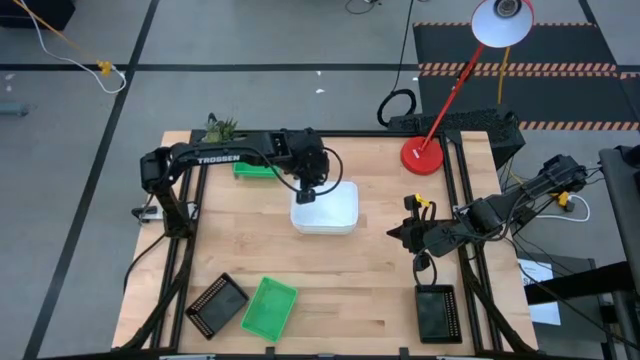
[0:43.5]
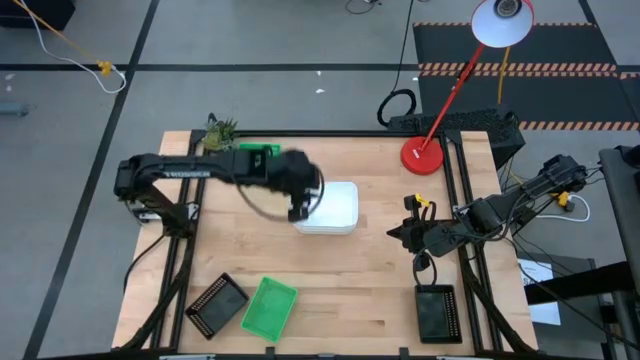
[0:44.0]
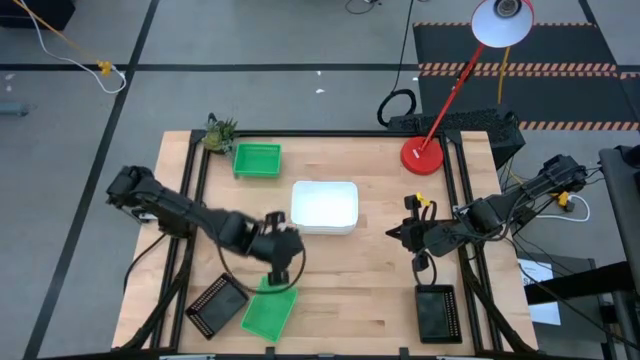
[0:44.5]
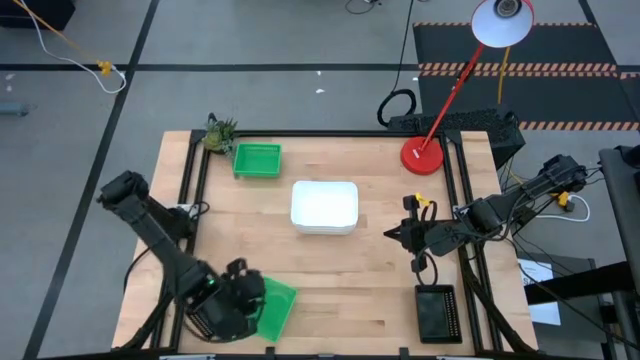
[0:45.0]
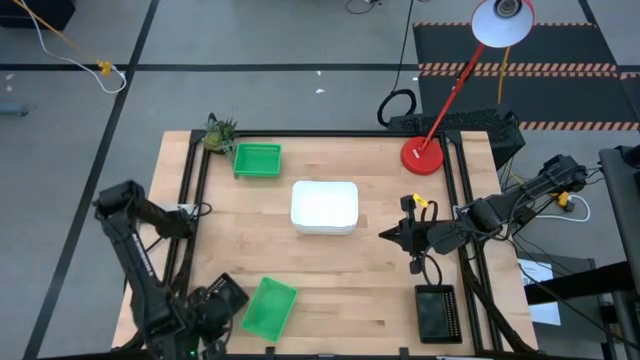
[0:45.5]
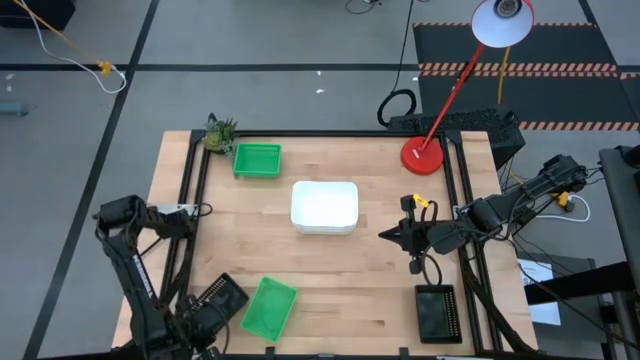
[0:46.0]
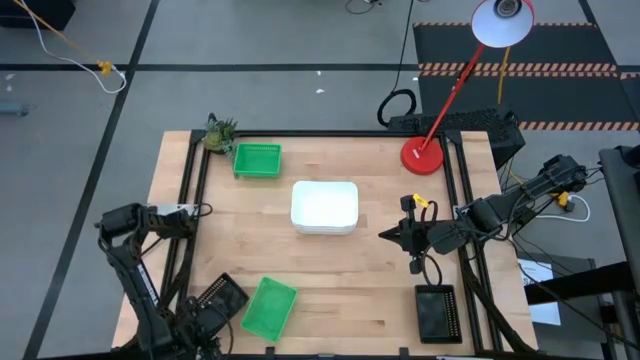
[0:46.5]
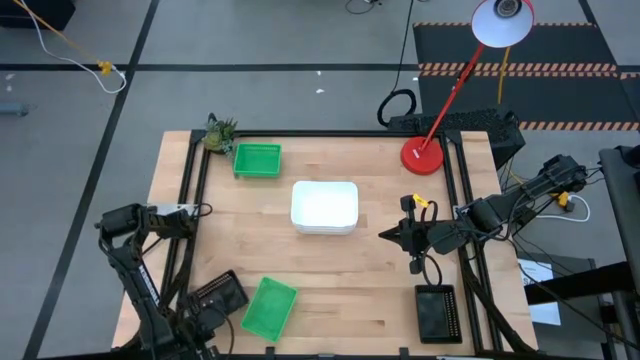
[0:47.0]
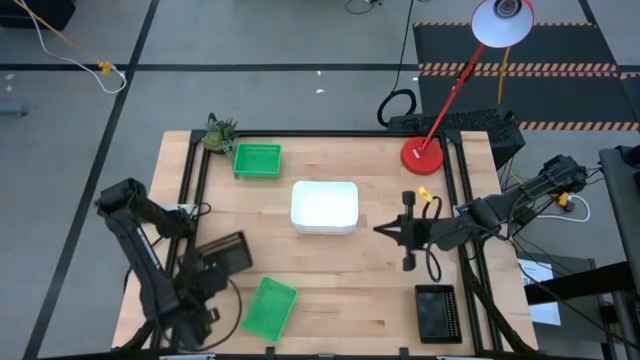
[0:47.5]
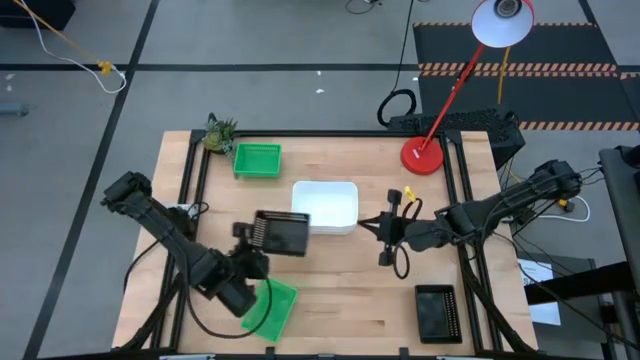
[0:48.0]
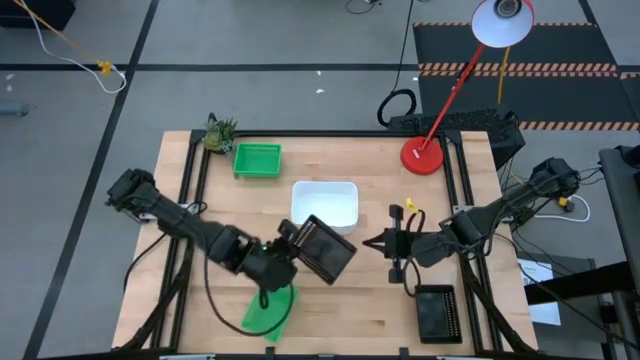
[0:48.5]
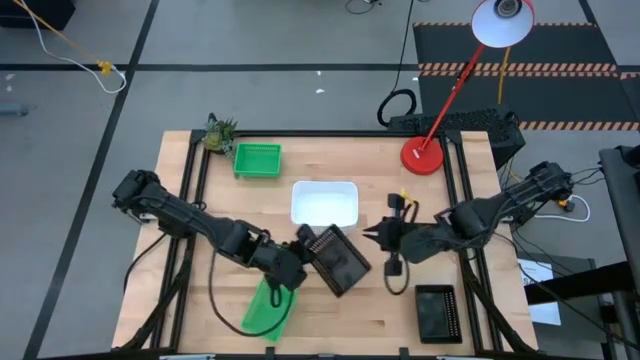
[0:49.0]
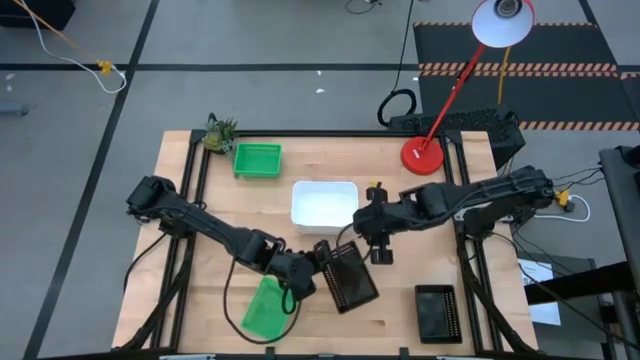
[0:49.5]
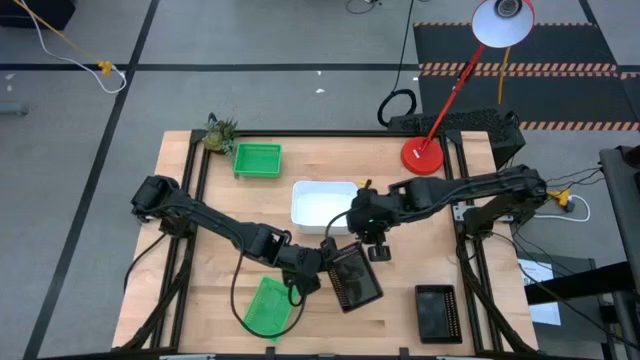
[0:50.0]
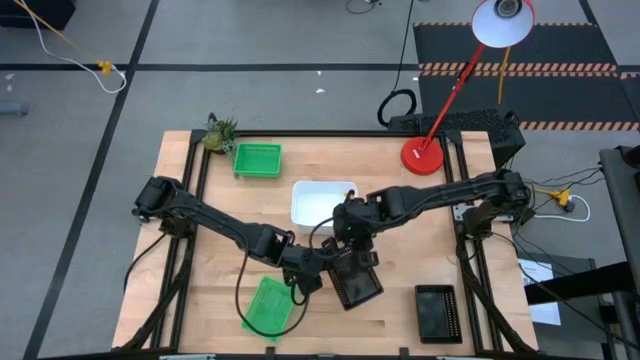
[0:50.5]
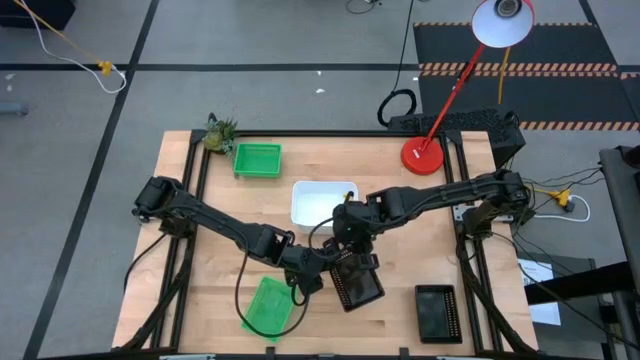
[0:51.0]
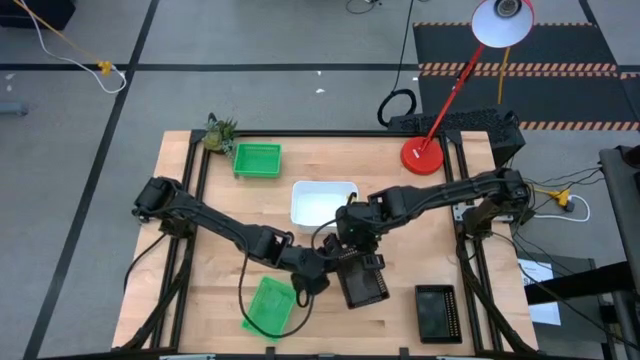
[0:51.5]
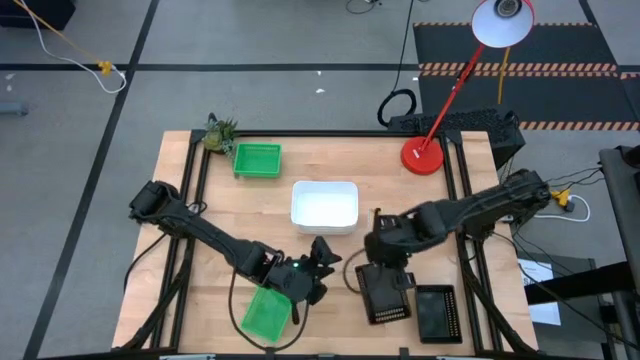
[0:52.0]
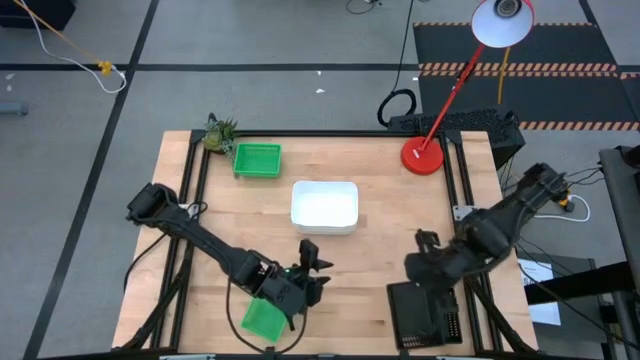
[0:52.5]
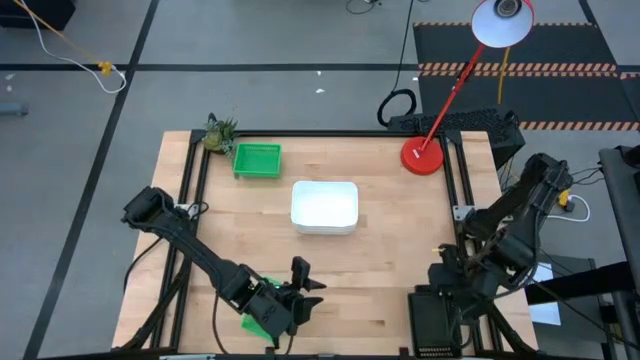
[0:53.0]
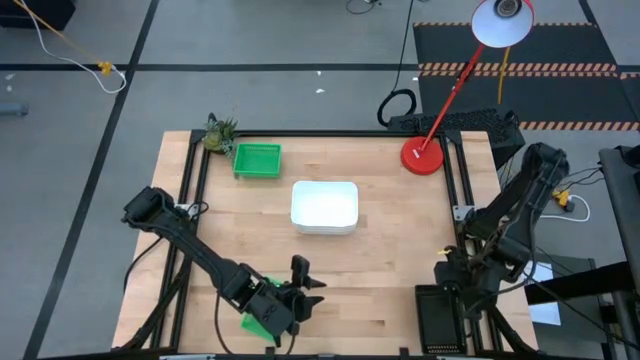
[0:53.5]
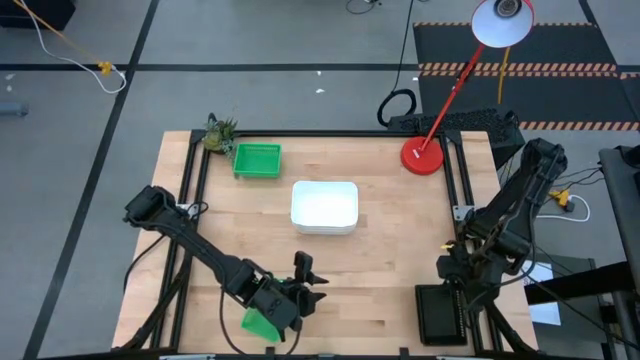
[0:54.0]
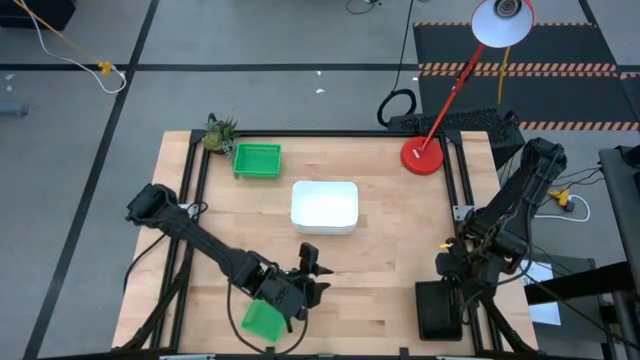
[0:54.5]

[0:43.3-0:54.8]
Stack the left black bin on top of the right black bins
